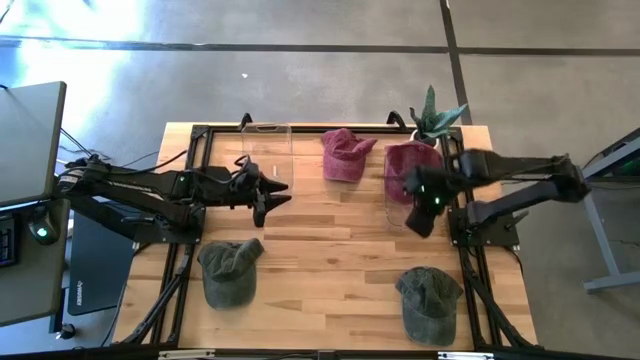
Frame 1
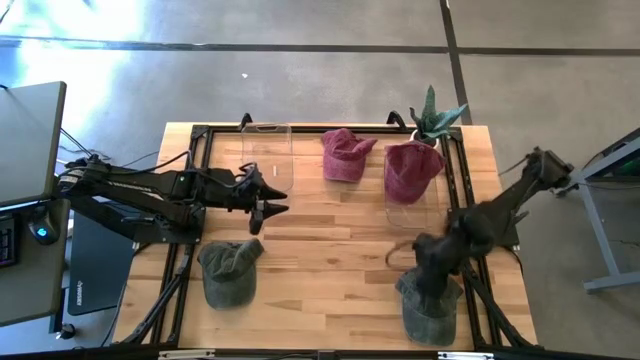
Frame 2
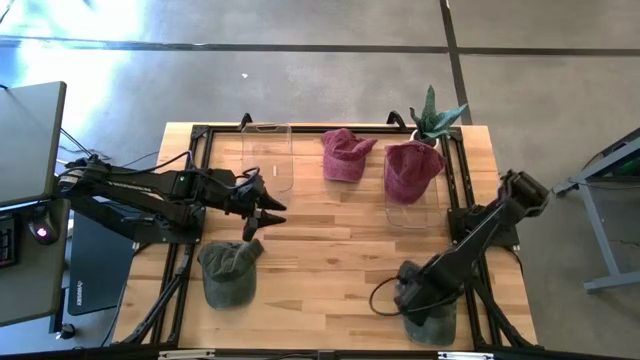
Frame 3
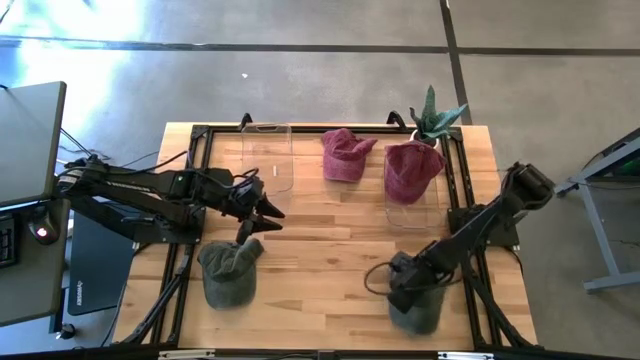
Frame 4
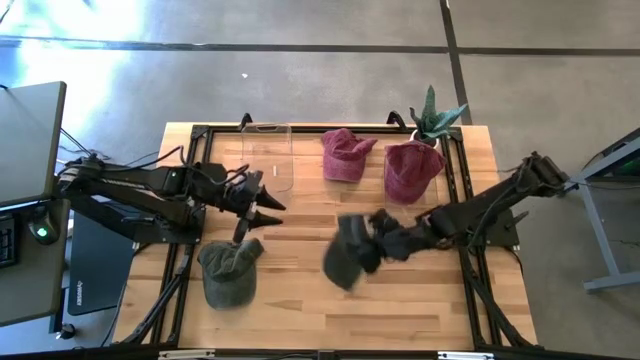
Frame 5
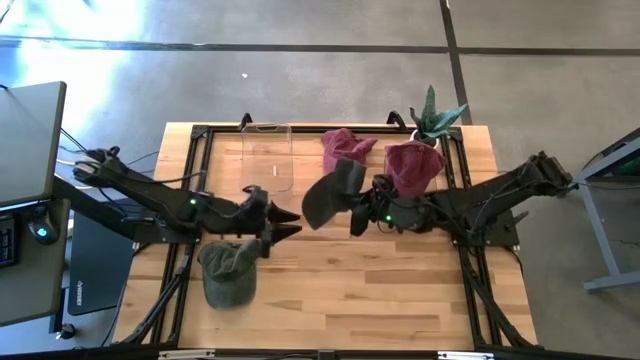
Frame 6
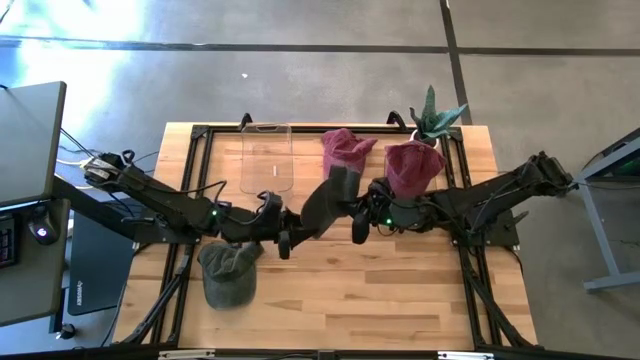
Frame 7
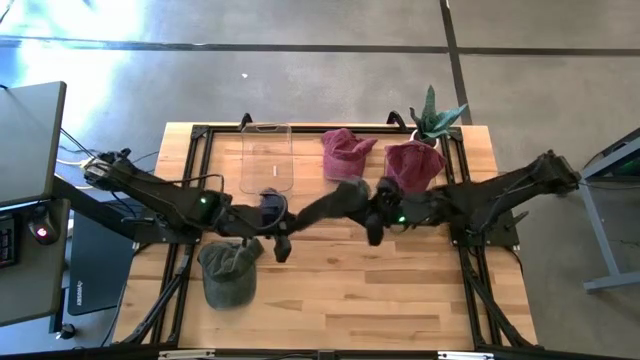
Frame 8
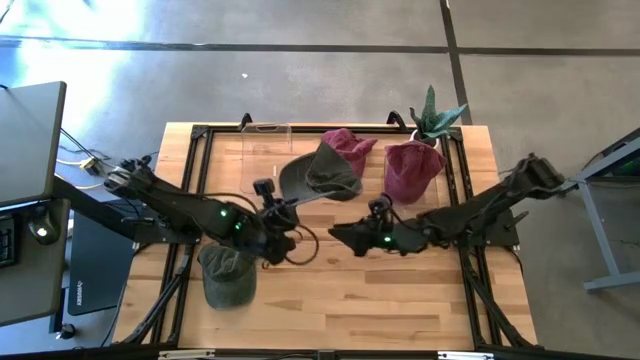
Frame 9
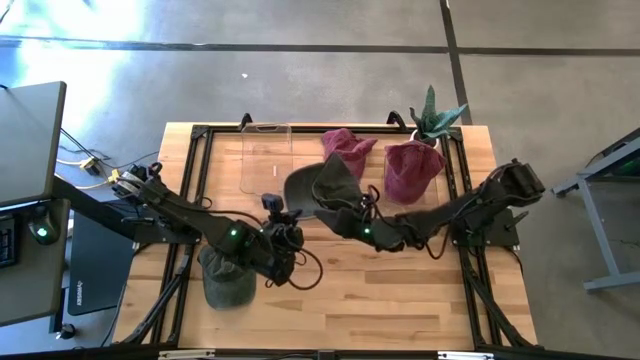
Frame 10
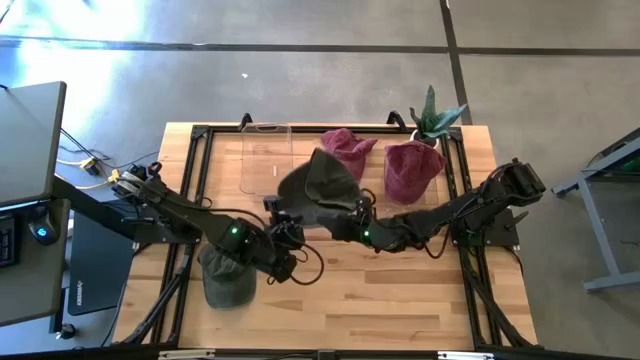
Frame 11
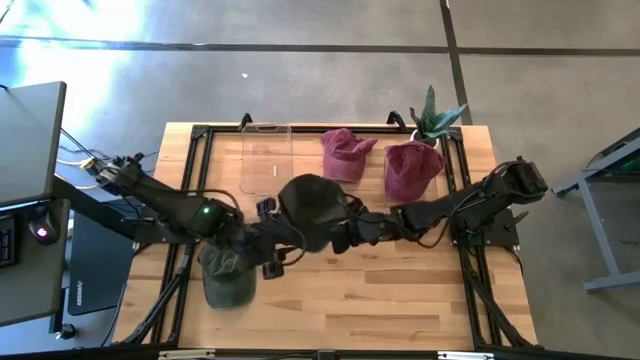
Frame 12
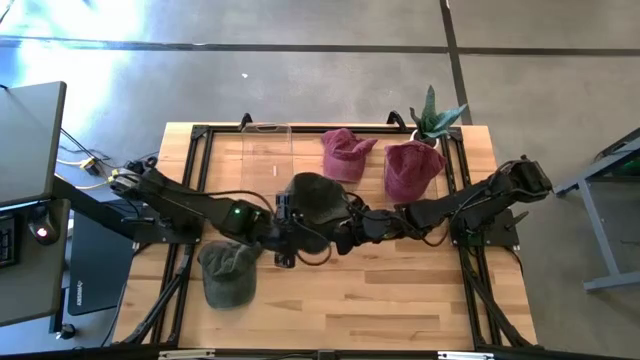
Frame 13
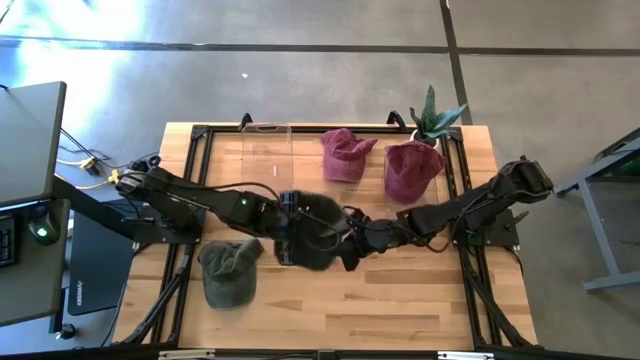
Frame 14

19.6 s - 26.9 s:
Task: Pick & Place hat
Put the right green cap into the left transparent bin

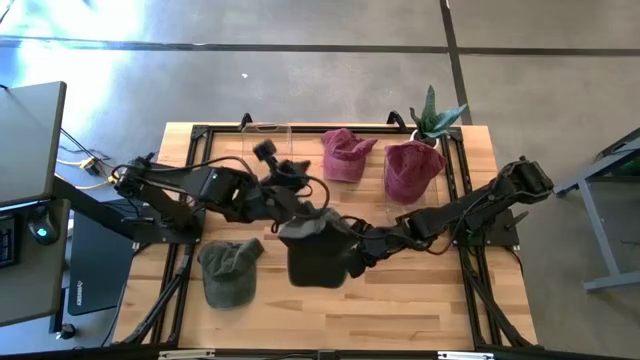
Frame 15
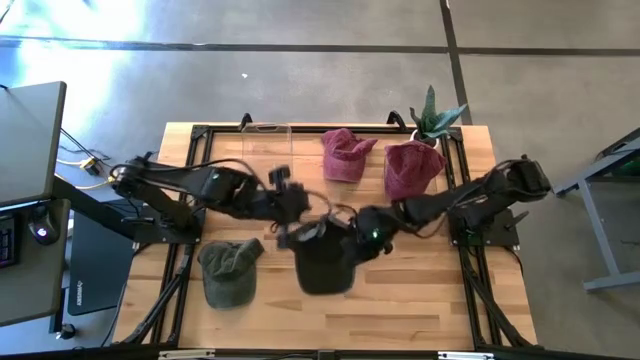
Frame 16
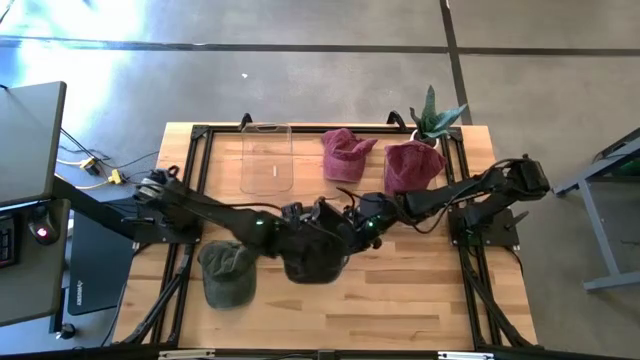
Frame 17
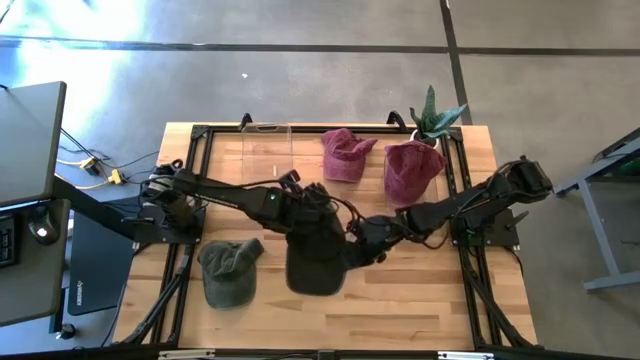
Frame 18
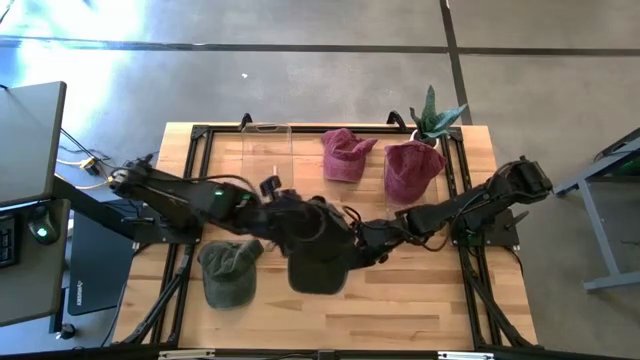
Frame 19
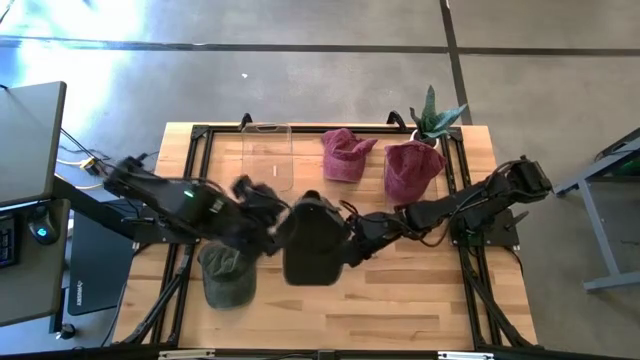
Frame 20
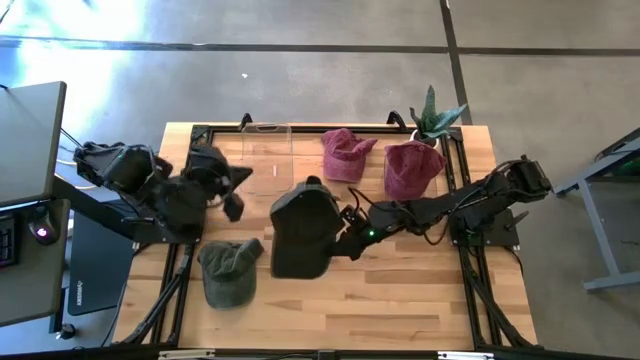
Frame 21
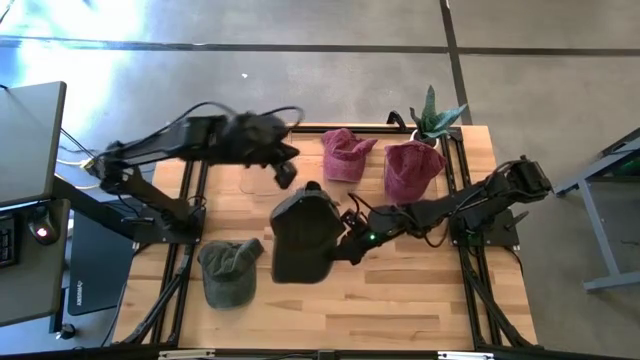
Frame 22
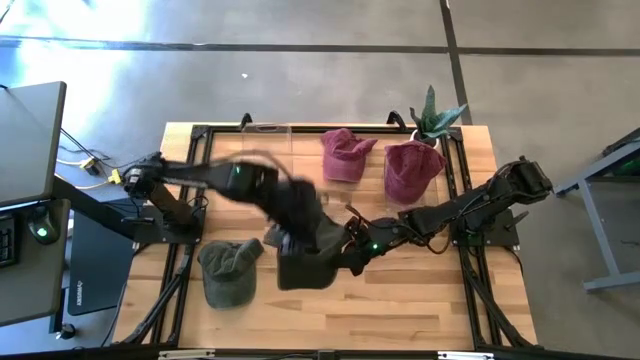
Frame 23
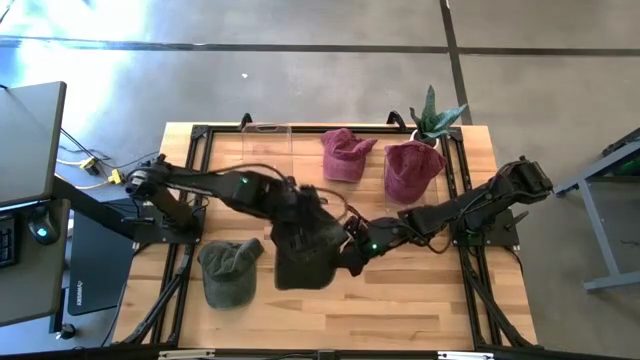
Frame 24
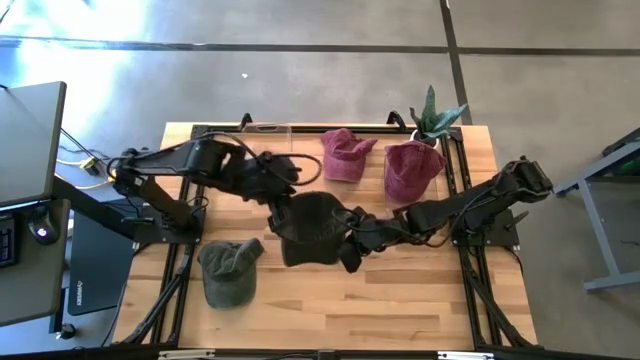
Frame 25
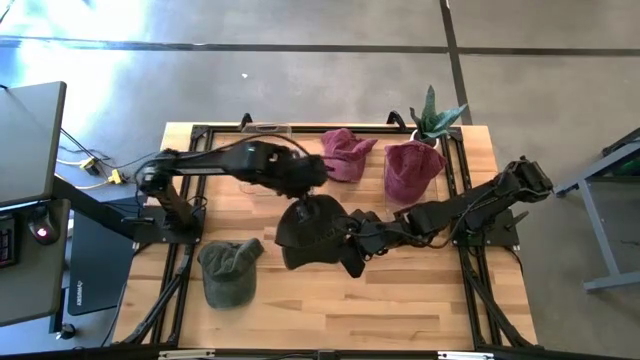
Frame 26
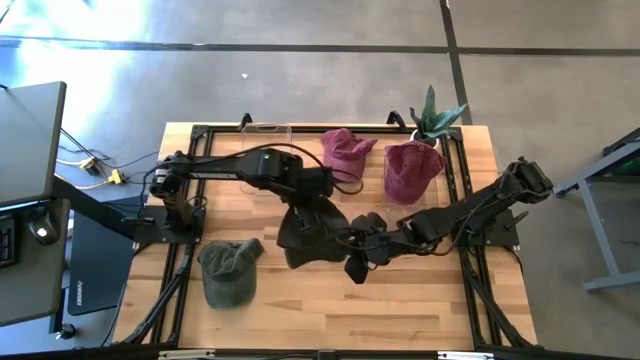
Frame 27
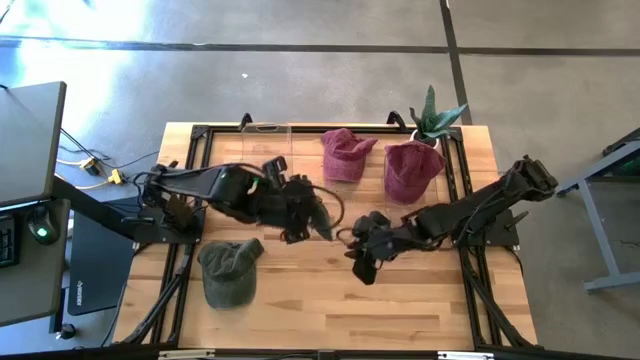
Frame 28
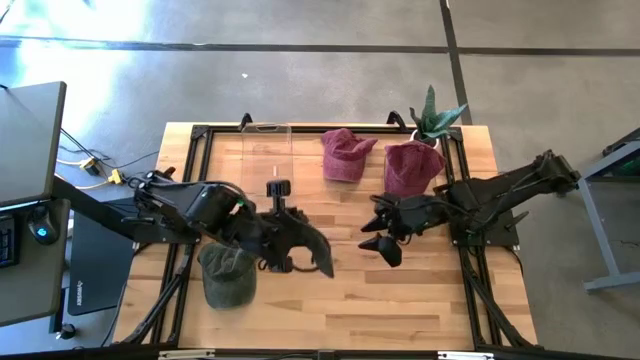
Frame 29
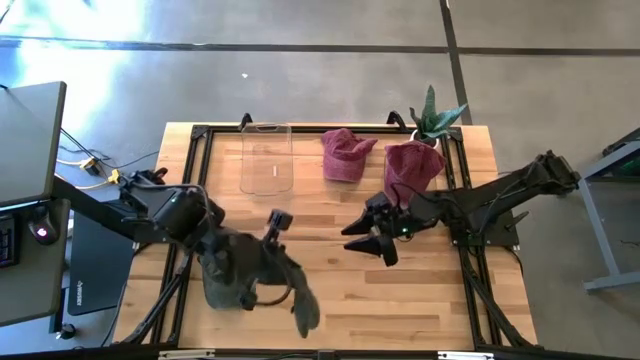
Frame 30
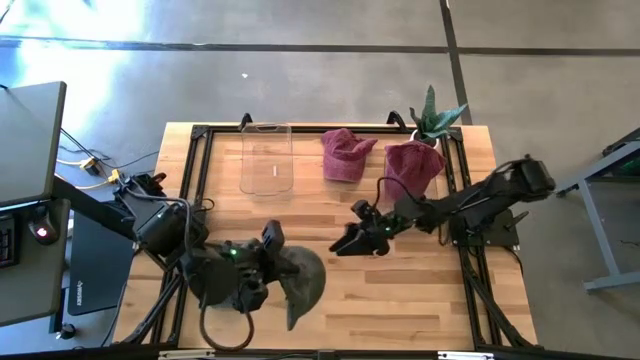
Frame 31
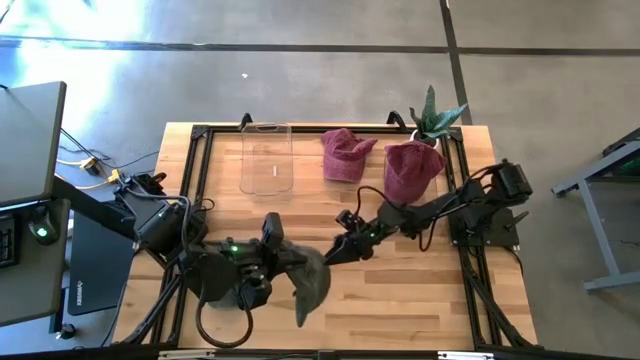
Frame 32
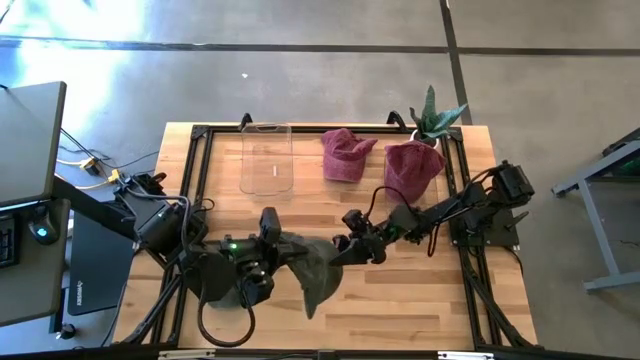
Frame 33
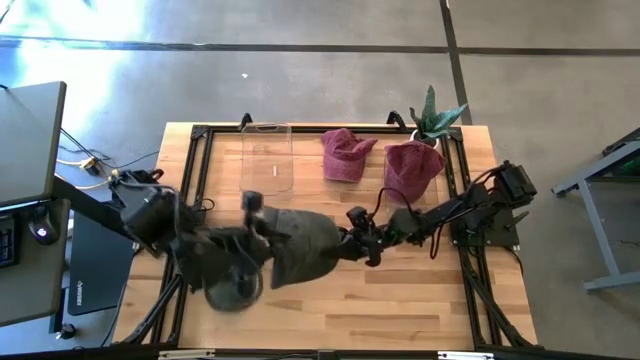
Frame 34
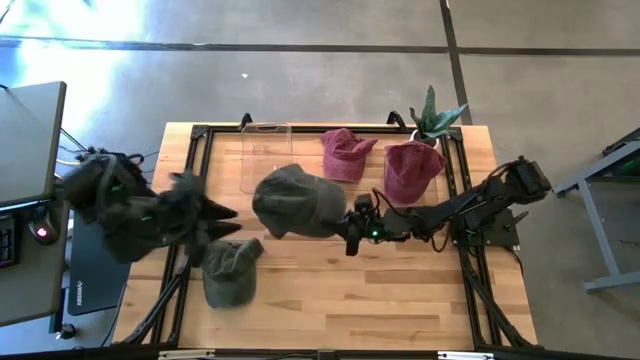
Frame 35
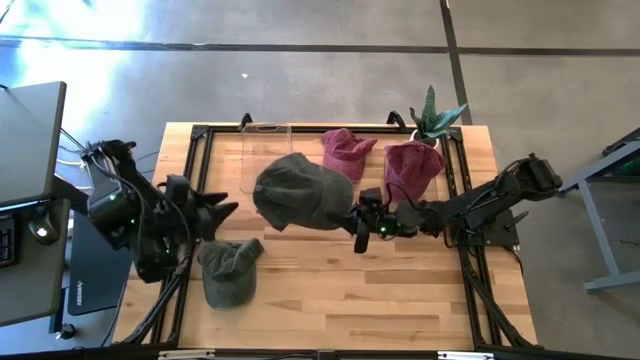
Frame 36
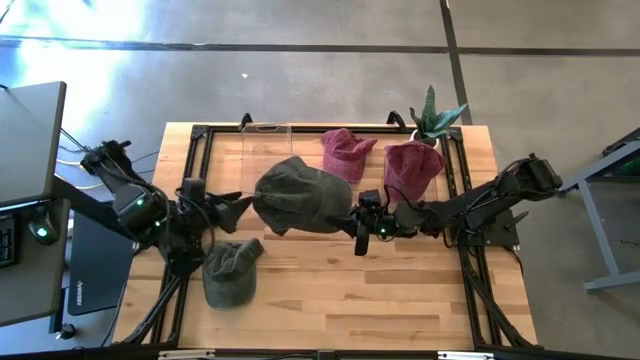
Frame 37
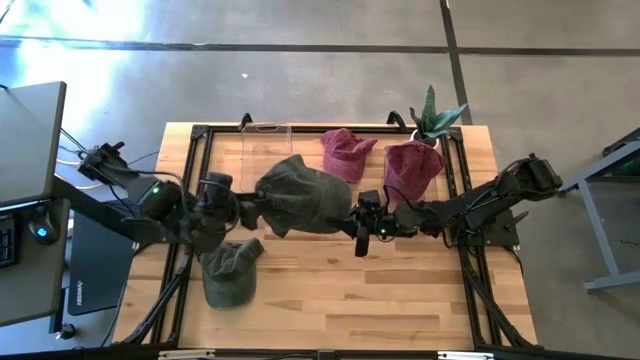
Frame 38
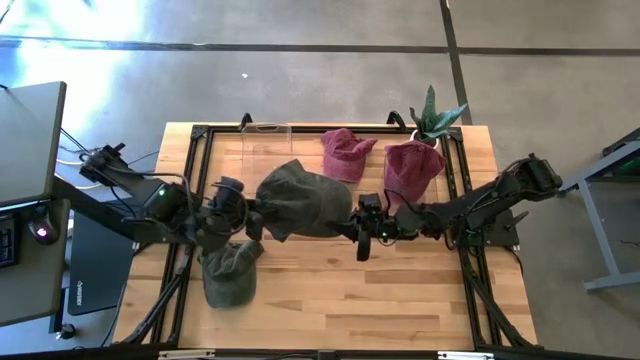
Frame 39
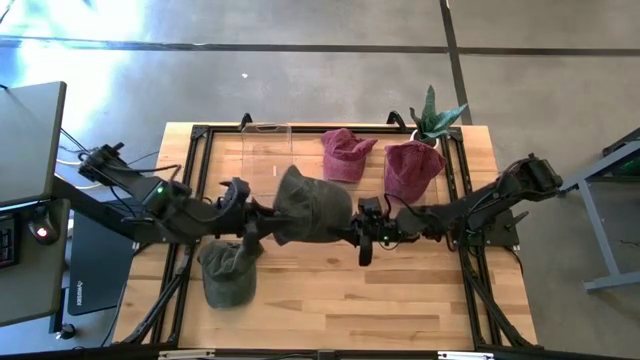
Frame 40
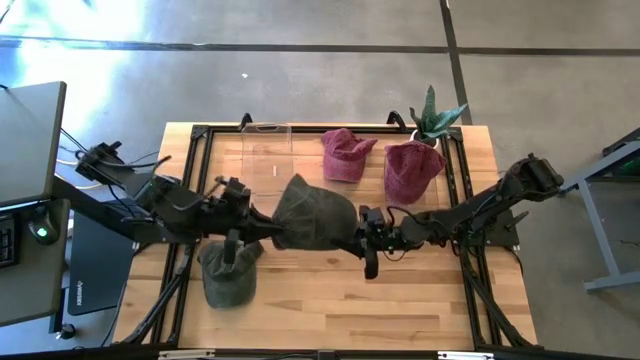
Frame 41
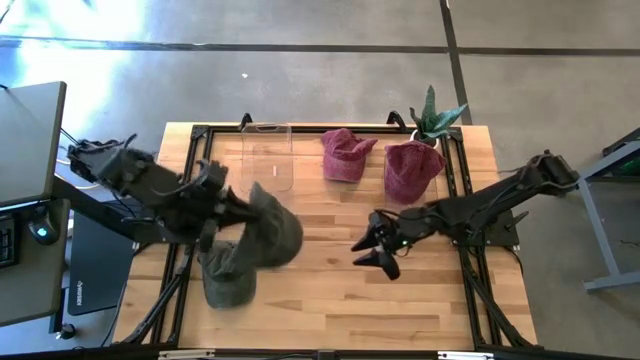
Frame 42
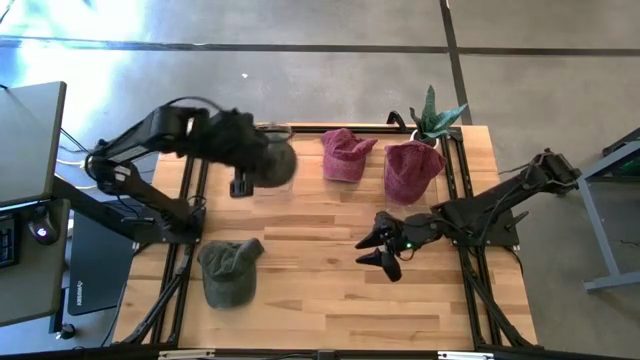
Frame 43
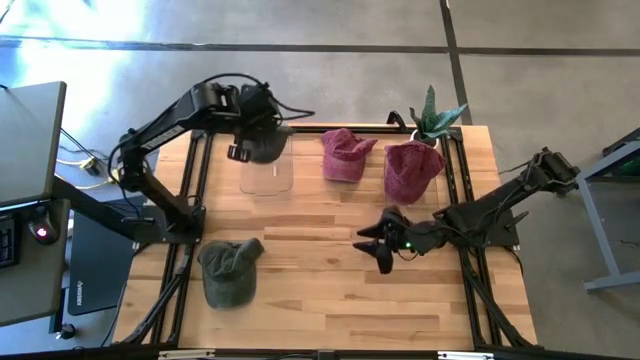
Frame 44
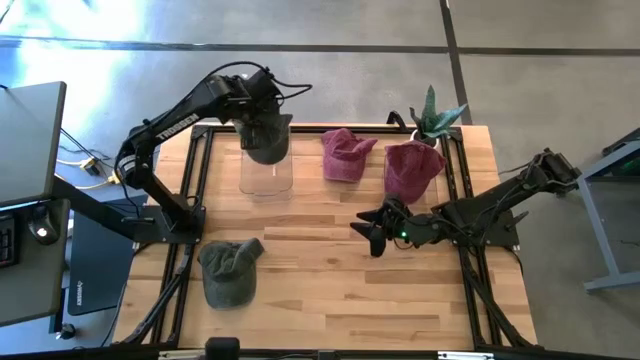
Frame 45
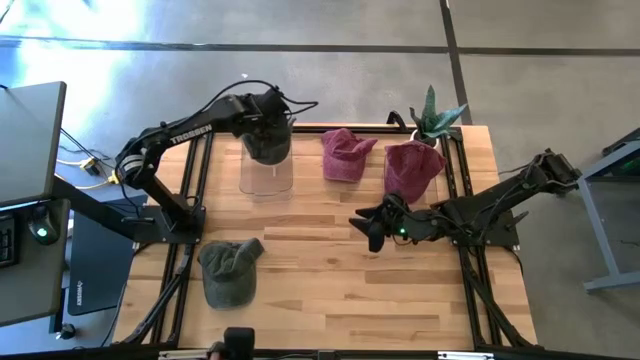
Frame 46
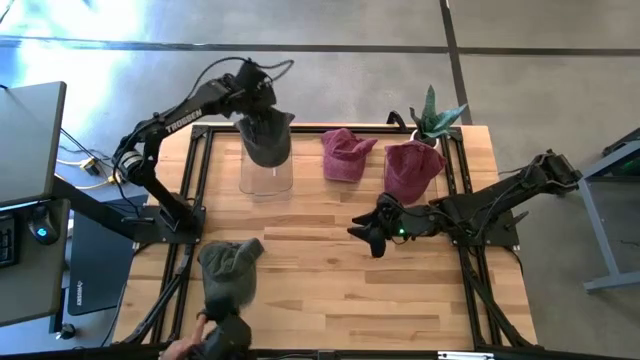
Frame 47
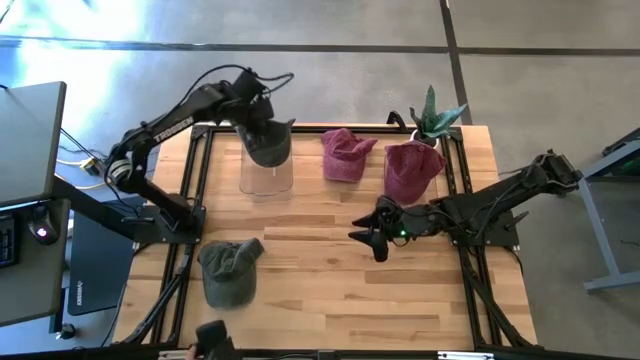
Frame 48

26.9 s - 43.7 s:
Put the right green cap into the left transparent bin
